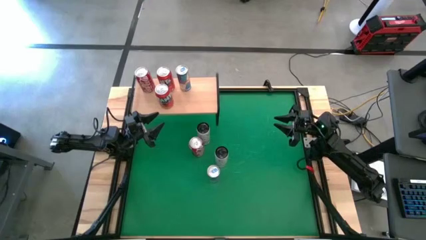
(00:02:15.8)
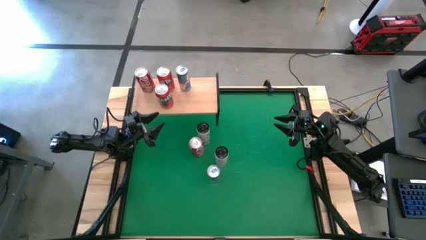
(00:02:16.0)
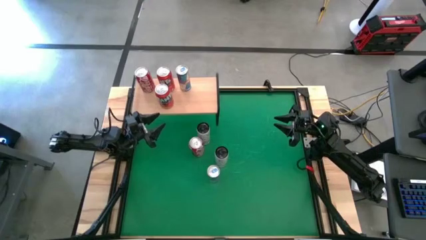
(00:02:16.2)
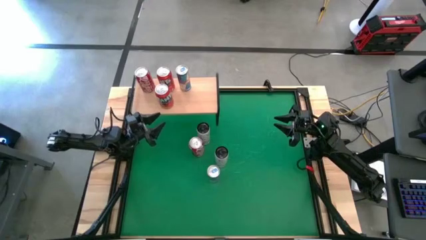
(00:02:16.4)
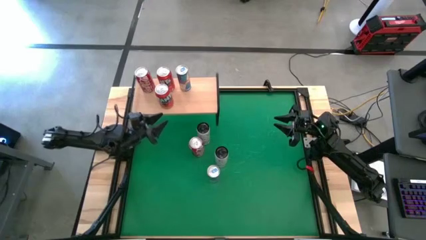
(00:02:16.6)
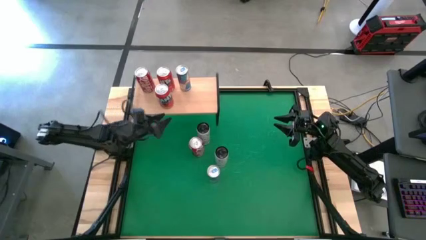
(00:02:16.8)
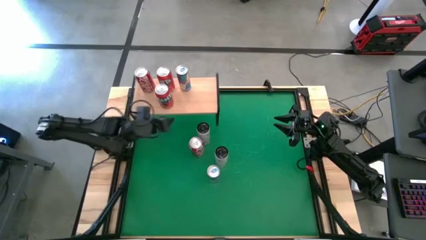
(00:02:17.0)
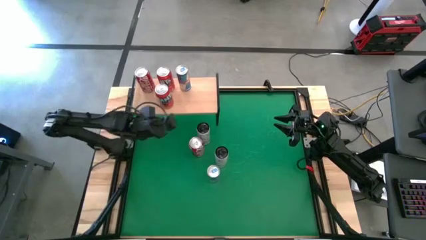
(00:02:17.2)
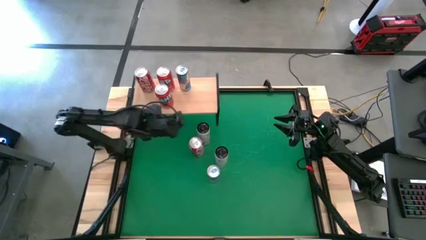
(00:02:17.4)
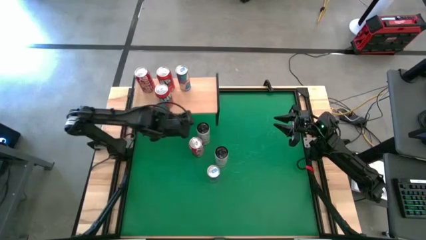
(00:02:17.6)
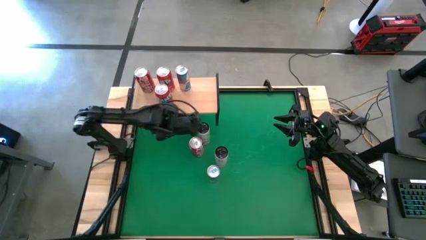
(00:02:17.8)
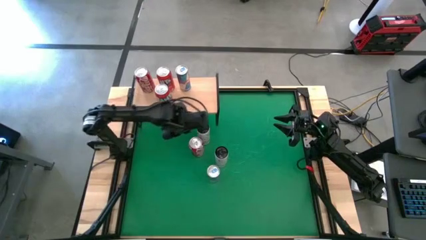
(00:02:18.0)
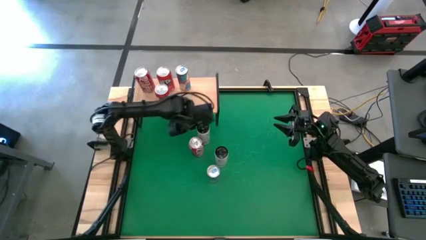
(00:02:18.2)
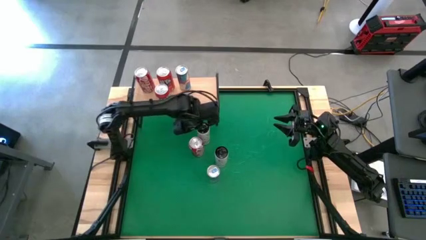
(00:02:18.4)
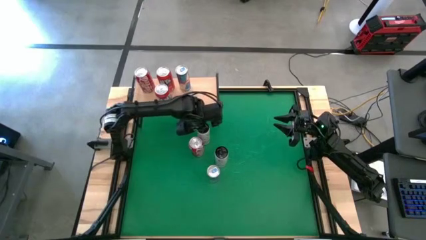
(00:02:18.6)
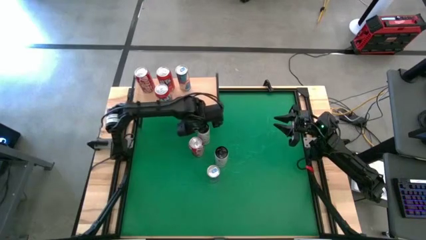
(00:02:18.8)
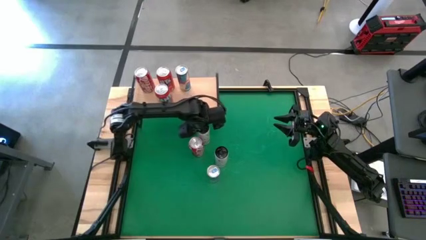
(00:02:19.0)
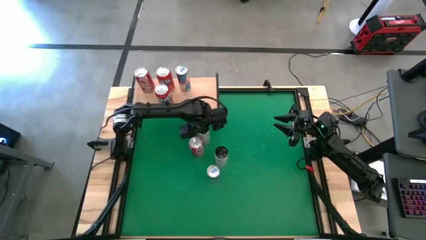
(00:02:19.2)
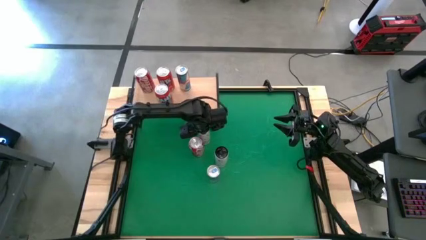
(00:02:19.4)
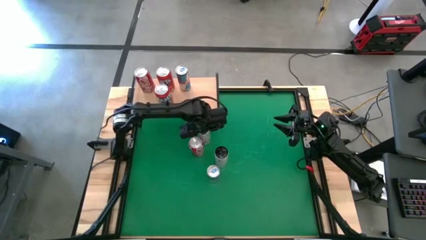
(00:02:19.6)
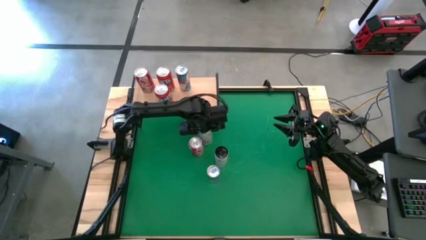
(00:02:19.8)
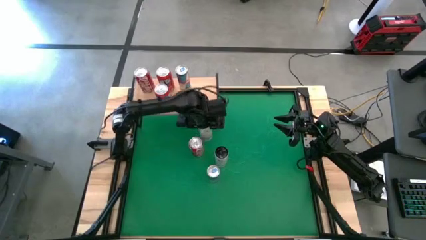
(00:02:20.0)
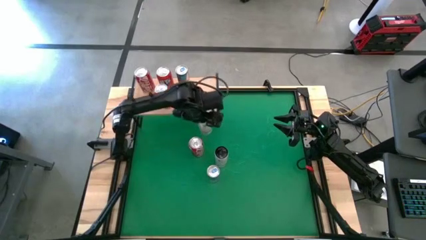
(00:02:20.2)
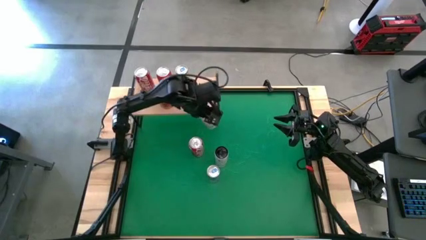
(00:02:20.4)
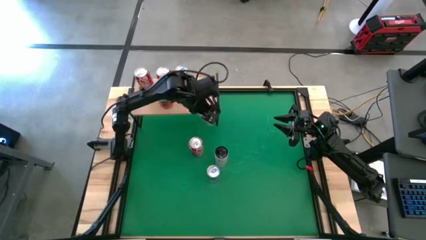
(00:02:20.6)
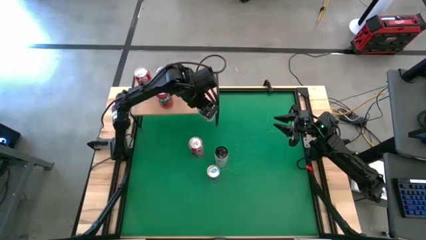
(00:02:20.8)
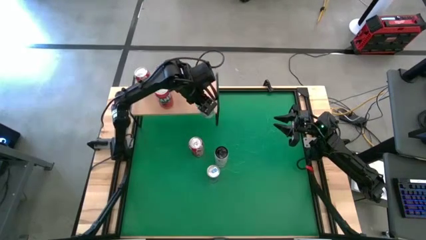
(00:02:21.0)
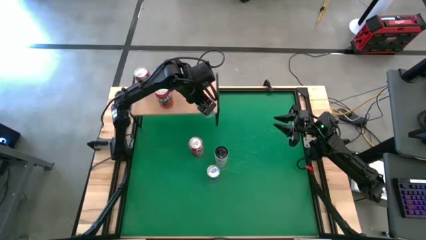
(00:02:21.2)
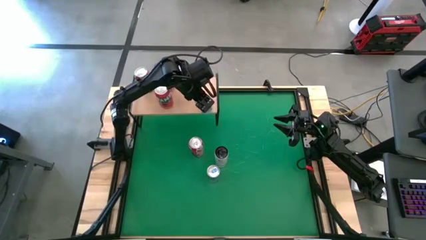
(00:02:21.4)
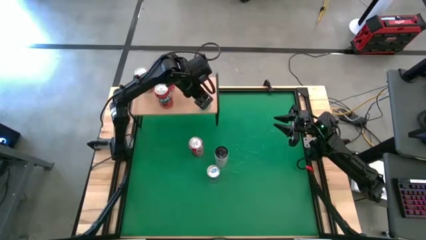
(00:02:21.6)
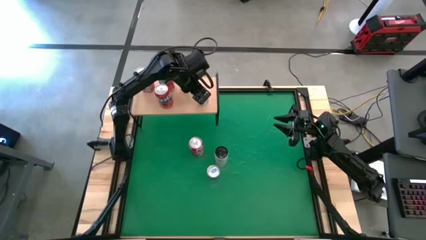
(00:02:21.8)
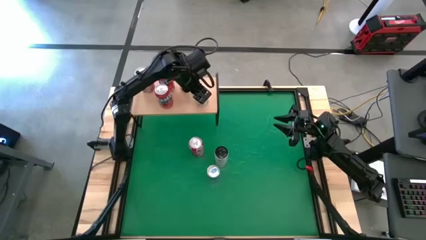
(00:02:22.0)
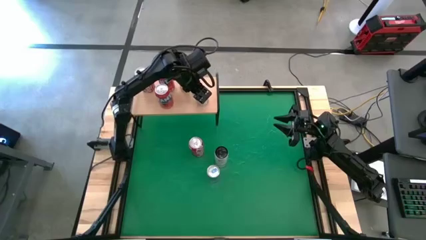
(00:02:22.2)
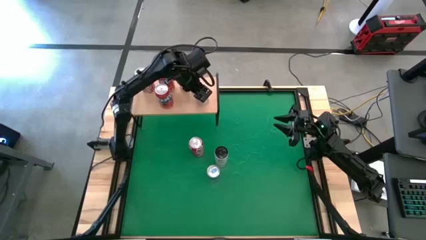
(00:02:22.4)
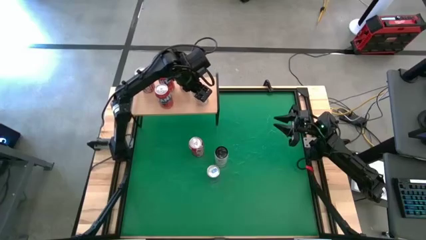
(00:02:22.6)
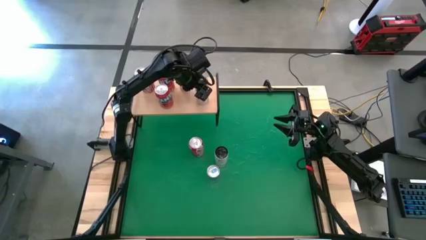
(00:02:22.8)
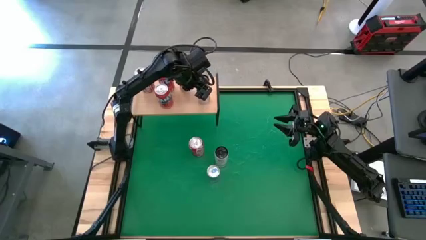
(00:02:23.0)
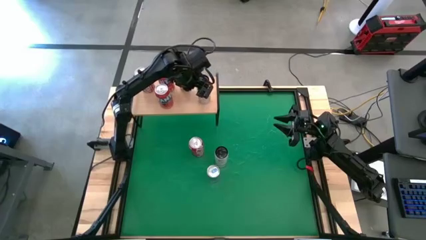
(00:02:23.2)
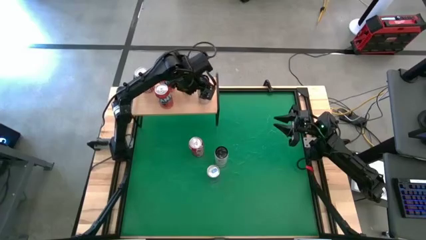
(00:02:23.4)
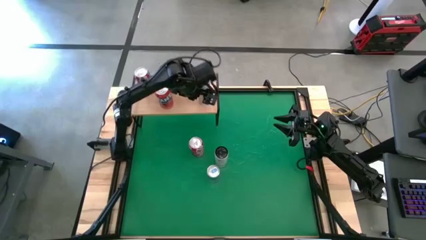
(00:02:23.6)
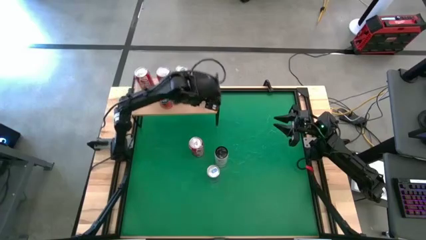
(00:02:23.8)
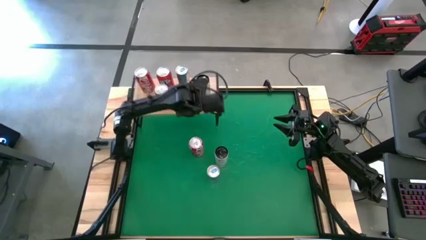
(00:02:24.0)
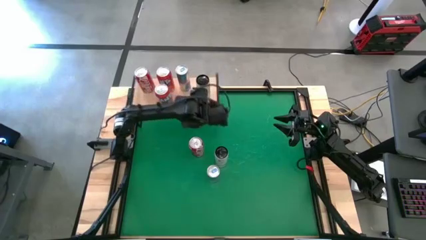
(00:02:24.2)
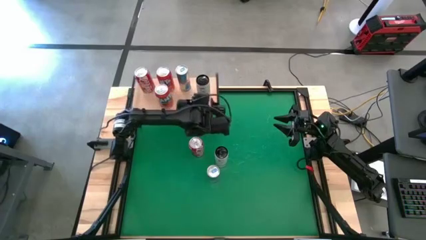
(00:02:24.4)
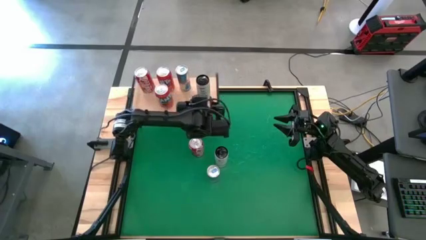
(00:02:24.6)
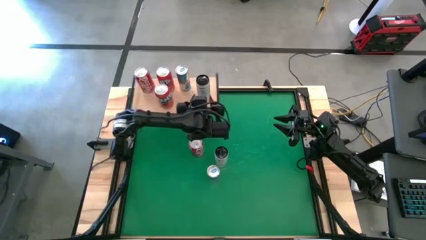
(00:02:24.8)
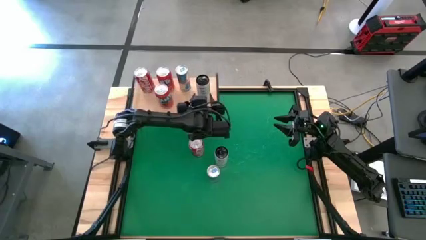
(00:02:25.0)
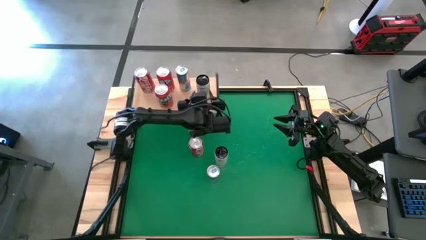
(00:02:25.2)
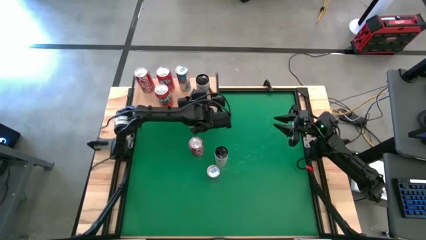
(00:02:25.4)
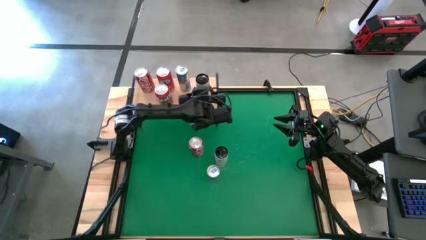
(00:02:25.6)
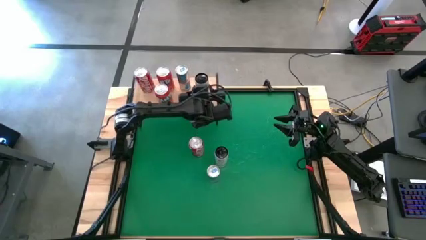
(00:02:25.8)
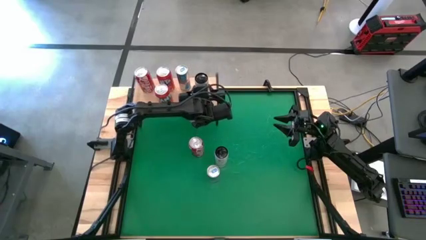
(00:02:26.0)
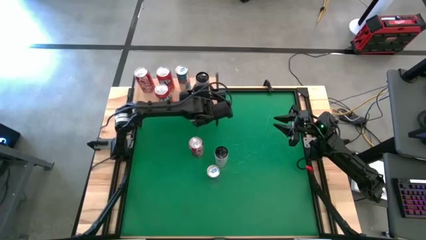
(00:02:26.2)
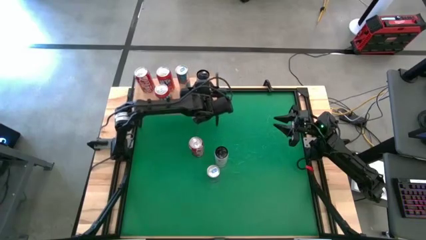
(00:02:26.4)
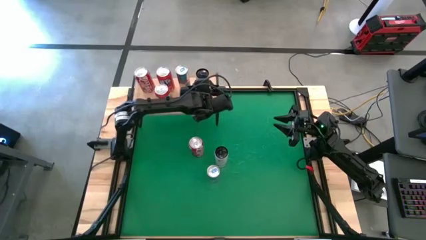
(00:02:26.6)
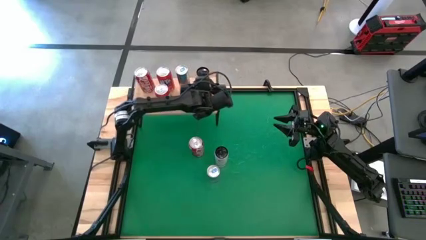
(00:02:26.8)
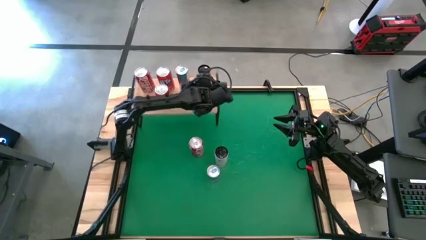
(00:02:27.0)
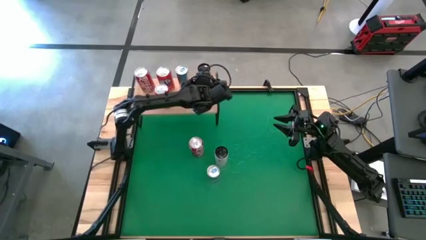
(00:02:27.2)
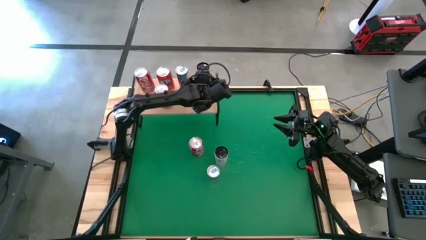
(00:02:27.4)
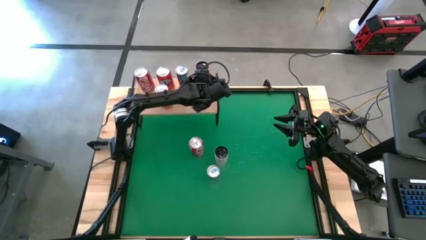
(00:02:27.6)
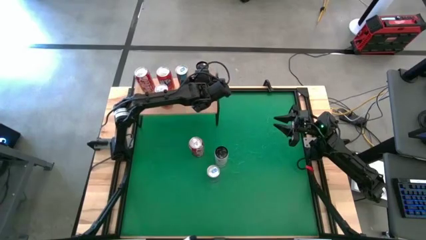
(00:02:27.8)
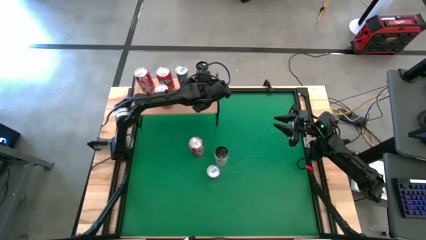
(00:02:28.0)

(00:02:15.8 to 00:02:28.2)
Task: Place canned beverage on shelf
Put the top white soda can on the shelf

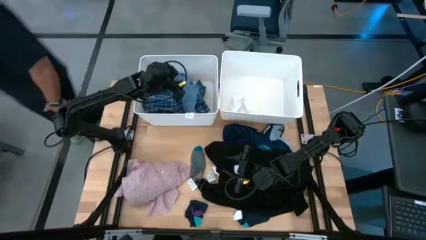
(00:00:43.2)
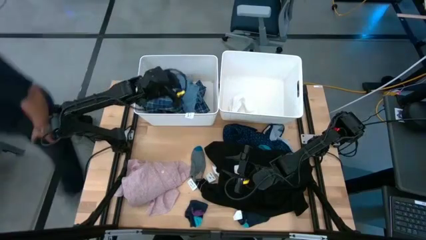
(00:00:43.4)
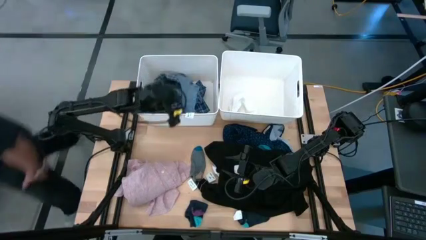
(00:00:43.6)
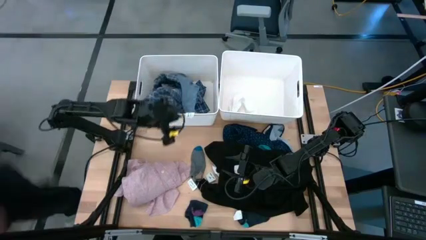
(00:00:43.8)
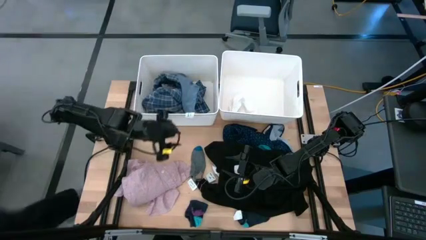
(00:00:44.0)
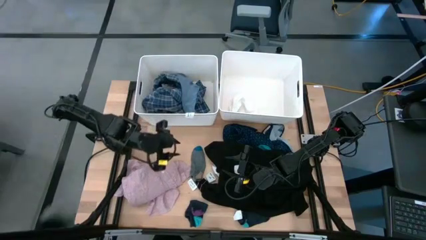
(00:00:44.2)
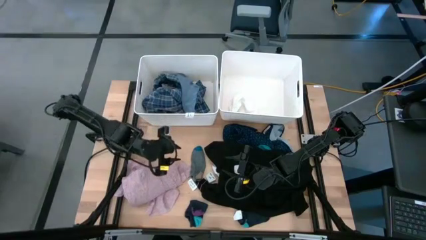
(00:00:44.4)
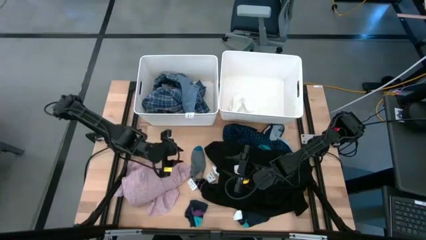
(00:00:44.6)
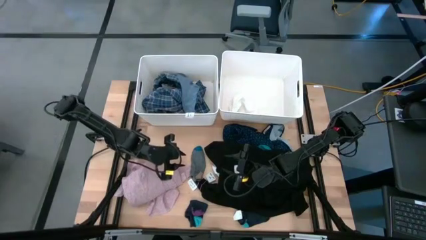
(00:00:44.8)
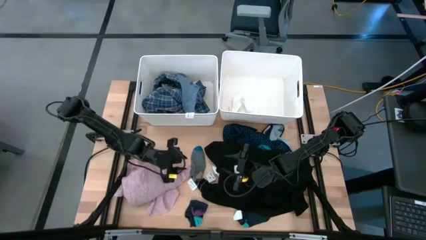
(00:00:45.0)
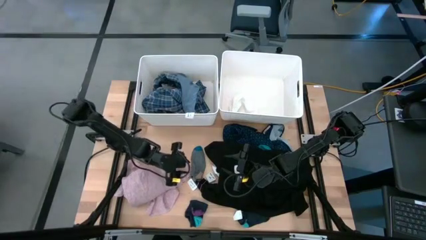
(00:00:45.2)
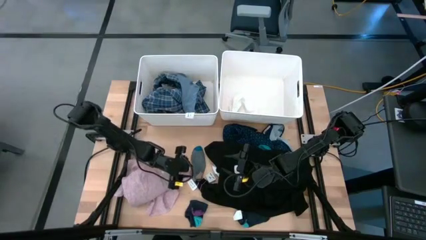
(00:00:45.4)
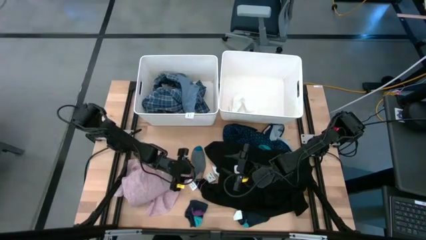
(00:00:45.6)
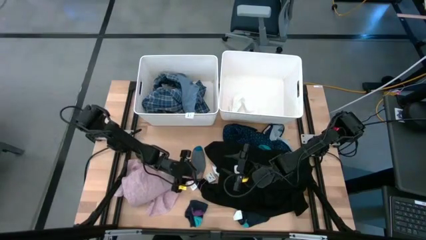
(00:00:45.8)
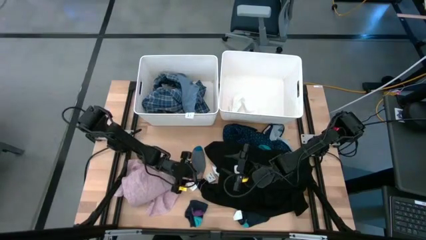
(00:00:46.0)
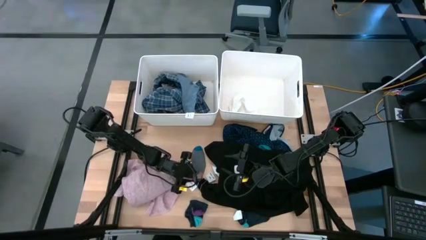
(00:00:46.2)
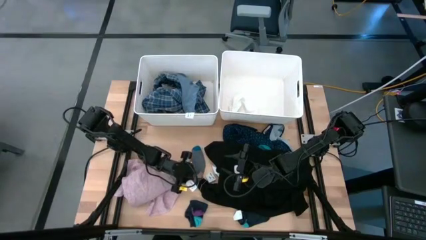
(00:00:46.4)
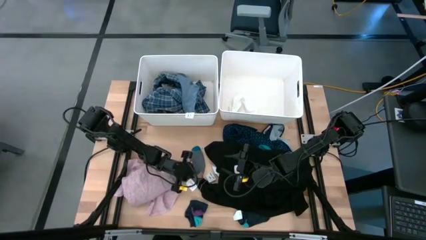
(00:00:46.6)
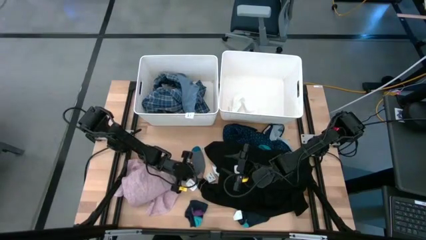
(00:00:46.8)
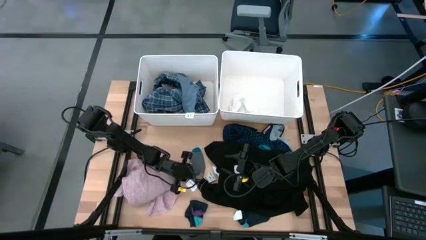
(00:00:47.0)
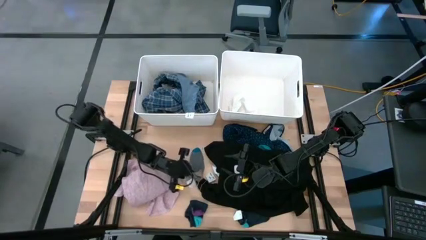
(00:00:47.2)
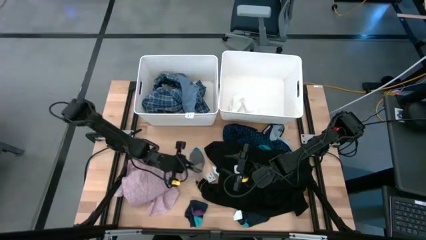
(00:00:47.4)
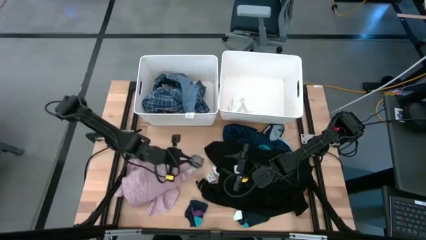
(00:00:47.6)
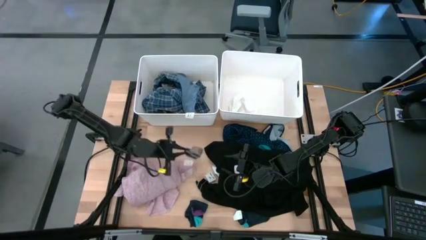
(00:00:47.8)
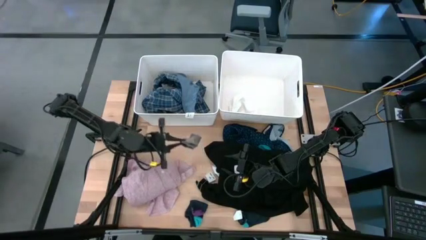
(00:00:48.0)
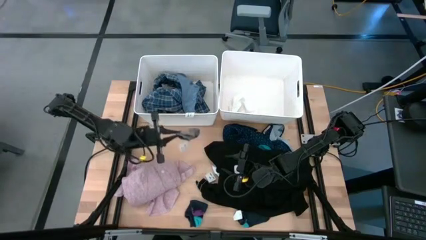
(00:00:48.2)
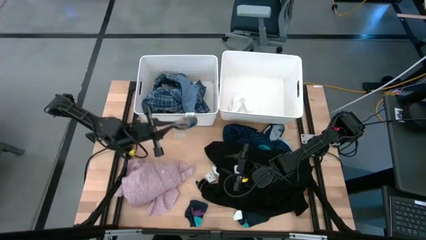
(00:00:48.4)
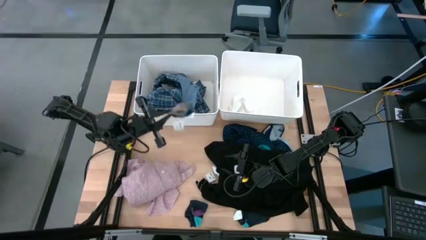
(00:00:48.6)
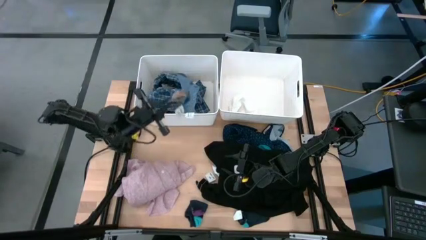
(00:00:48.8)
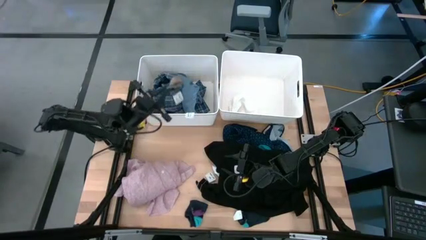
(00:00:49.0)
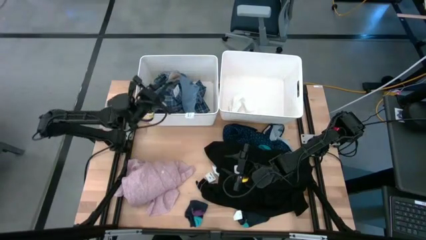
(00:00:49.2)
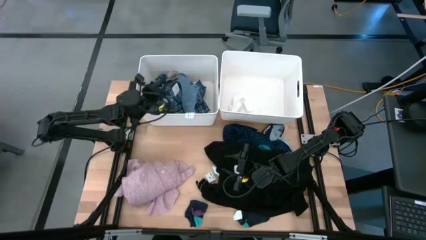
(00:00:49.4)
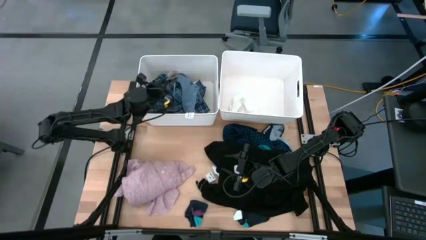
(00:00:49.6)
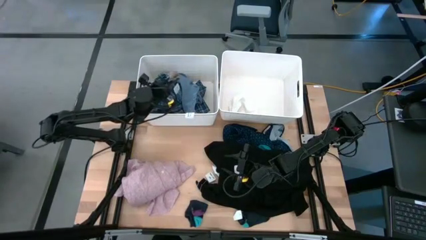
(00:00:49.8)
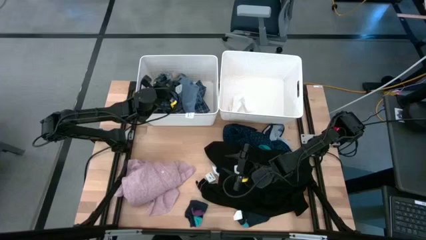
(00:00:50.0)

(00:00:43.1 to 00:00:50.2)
Task: Sort clothes
Put the gray sock into the left white bin
